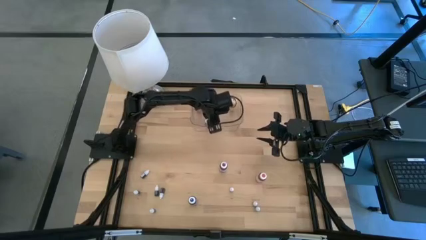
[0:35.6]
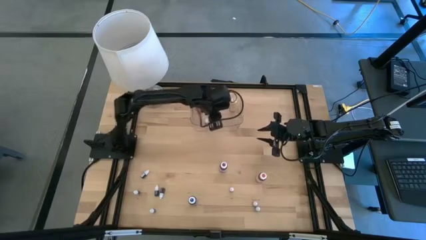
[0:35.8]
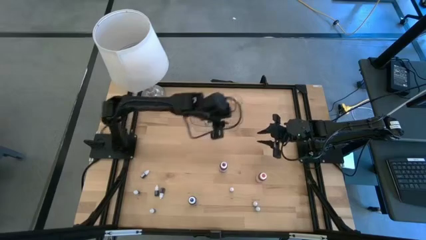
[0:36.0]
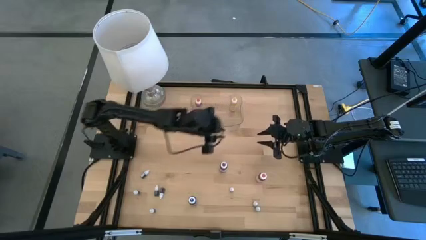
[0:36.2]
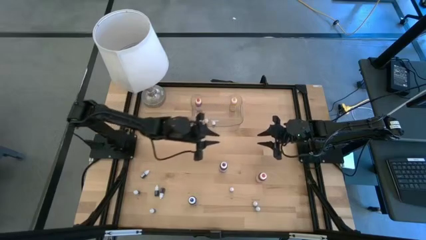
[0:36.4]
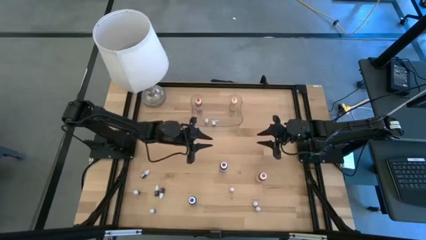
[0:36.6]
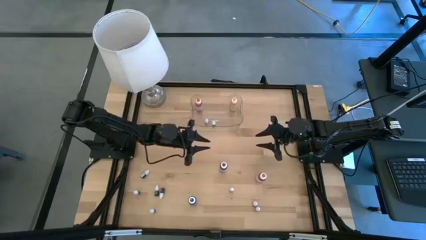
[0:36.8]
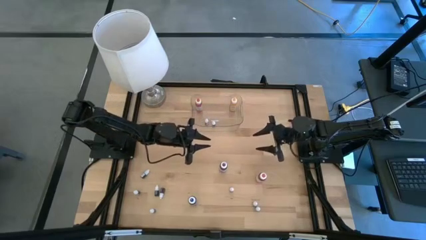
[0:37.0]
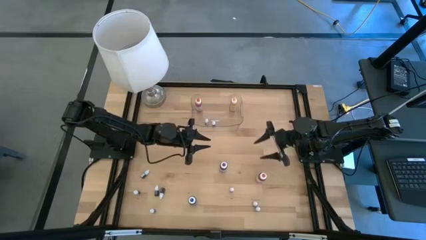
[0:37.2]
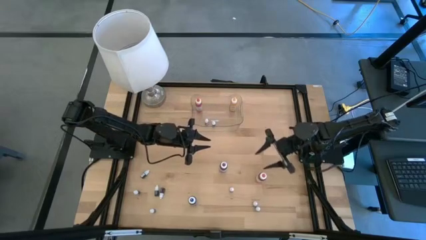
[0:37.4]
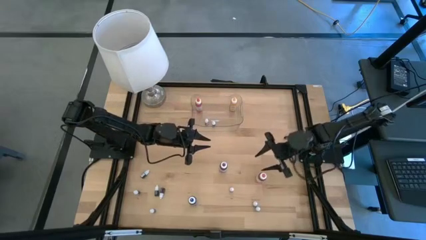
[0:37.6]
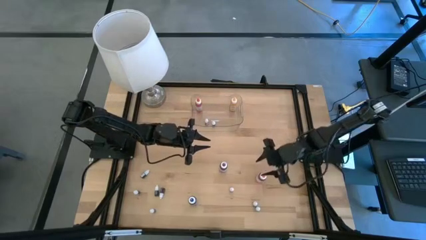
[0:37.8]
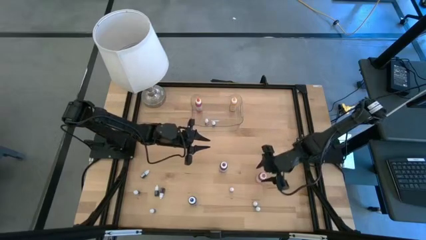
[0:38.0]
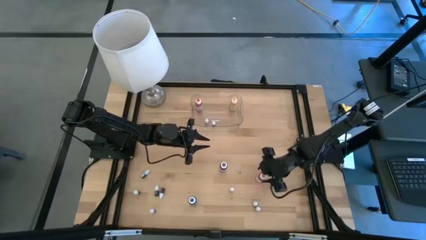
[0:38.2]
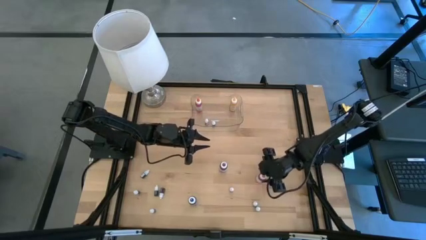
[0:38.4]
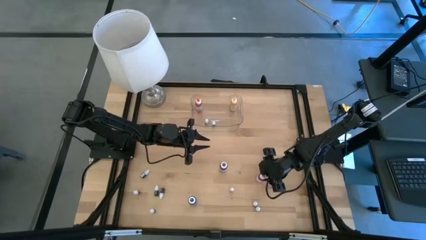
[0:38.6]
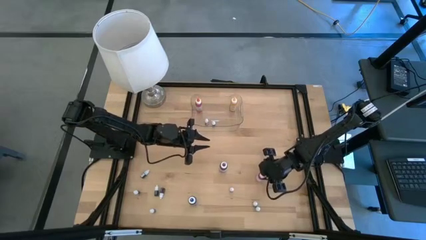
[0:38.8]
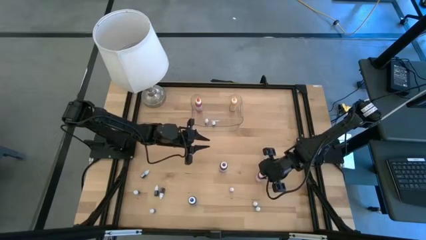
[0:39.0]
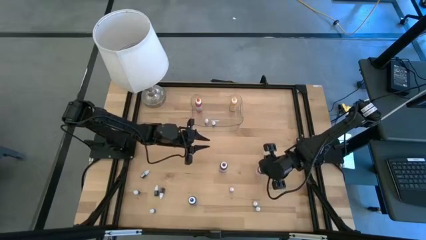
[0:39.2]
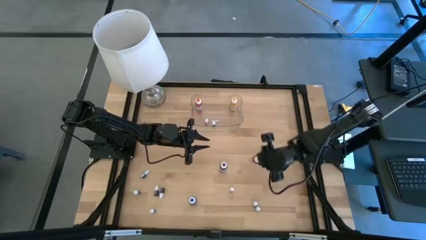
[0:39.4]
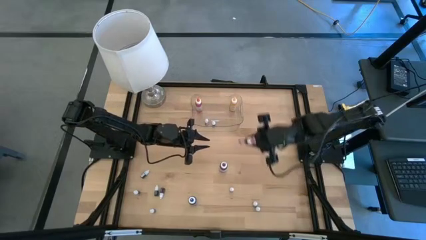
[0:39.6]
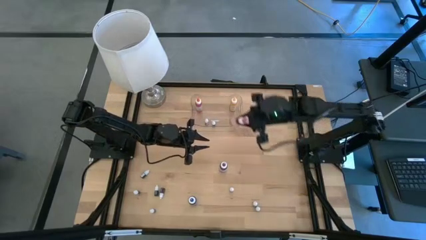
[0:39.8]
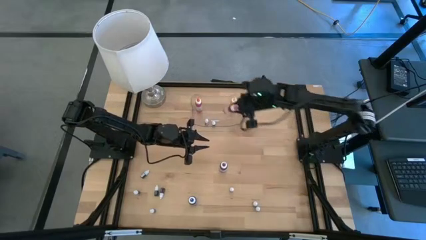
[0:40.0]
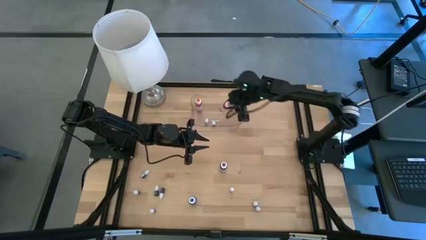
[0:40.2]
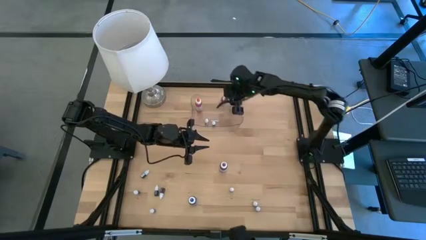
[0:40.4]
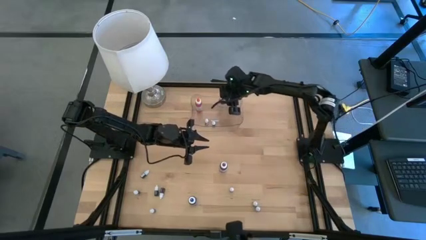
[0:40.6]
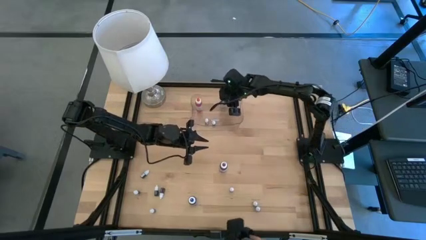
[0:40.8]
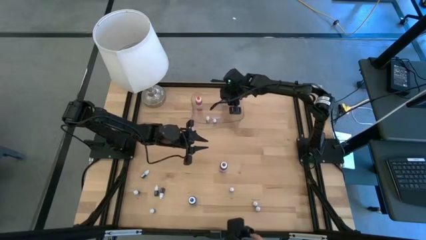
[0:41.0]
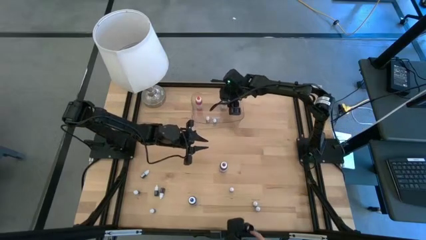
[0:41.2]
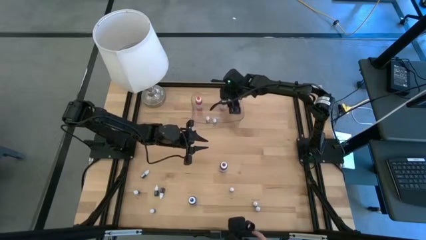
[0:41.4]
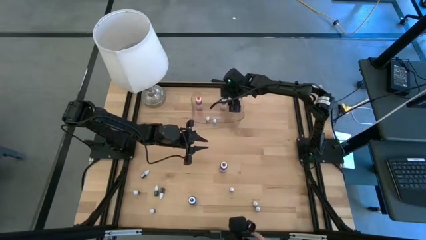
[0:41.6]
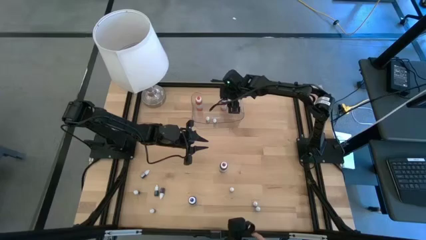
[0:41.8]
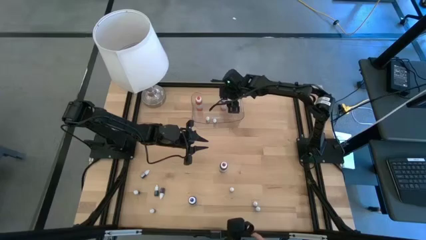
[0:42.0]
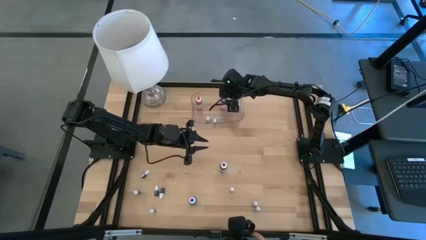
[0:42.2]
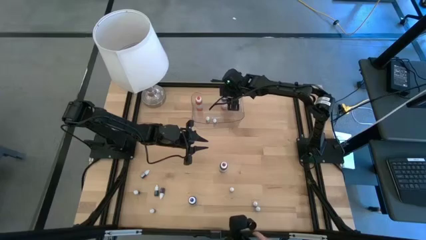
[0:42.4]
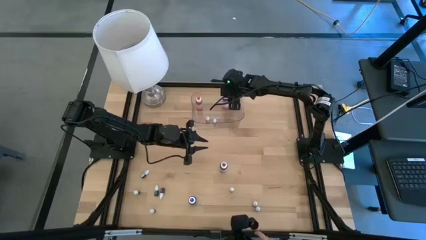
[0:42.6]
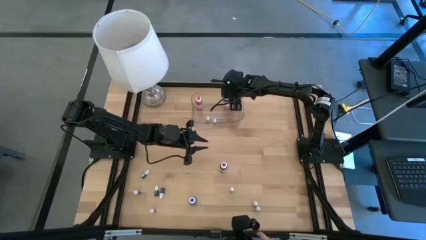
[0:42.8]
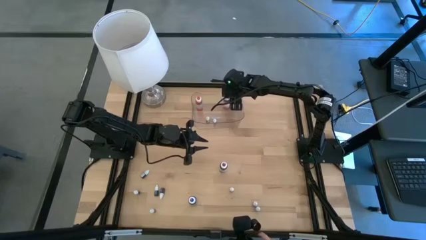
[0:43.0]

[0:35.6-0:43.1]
Task: Pick & Place food coloring
Put the large pink food coloring bottle into the transparent bin

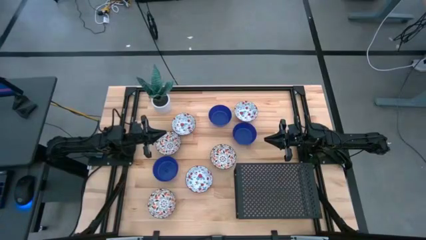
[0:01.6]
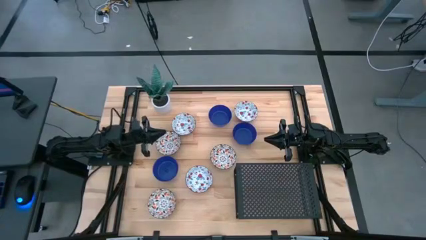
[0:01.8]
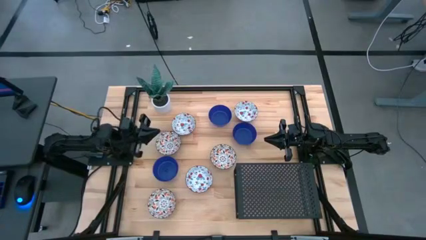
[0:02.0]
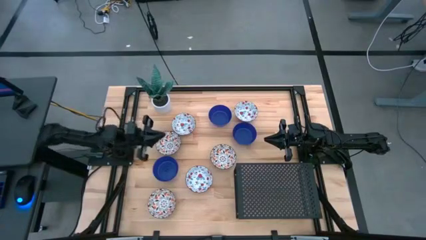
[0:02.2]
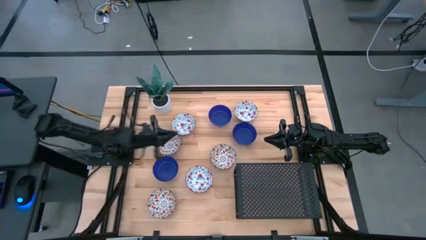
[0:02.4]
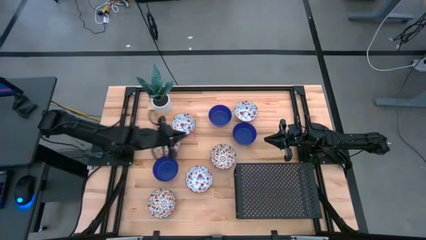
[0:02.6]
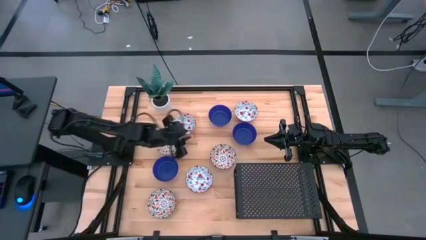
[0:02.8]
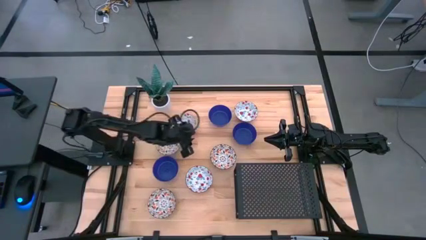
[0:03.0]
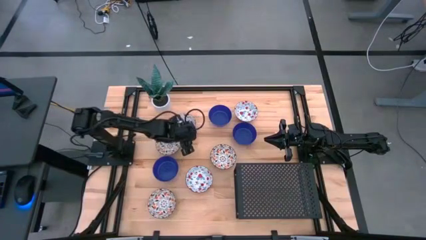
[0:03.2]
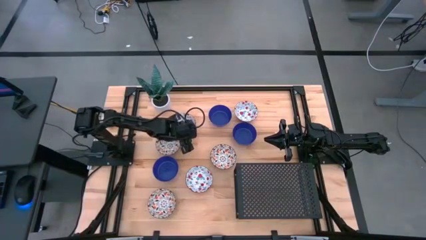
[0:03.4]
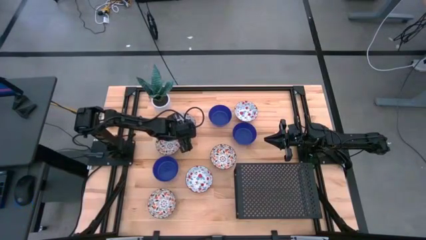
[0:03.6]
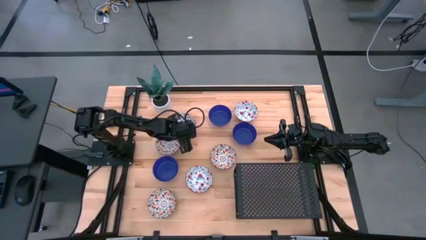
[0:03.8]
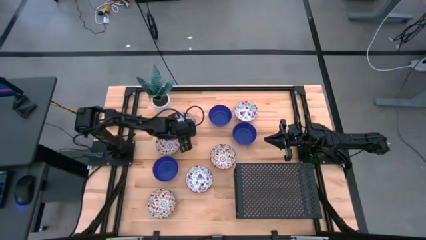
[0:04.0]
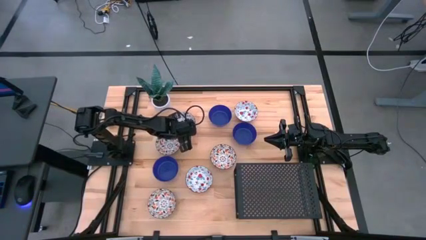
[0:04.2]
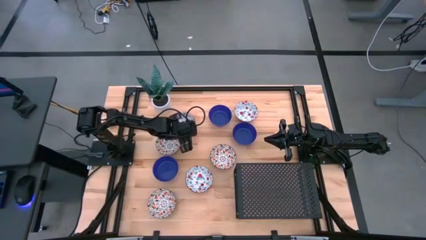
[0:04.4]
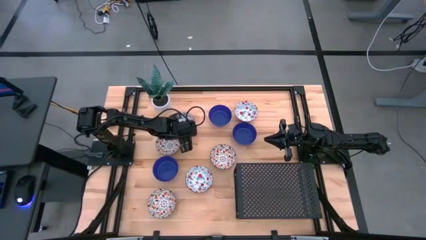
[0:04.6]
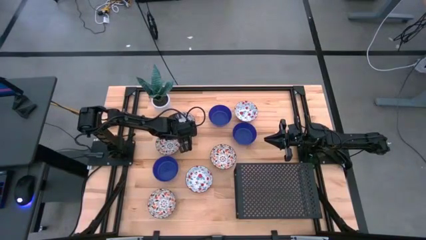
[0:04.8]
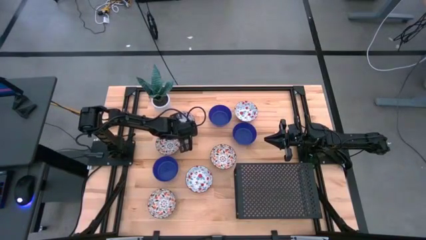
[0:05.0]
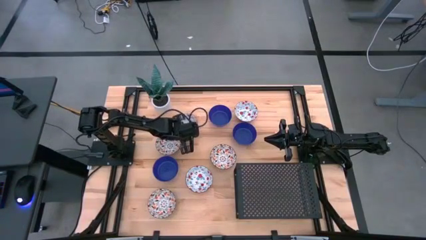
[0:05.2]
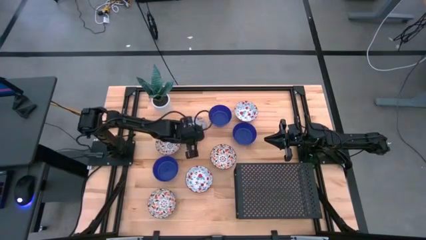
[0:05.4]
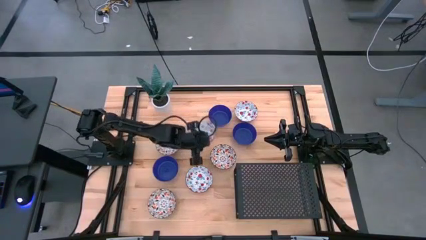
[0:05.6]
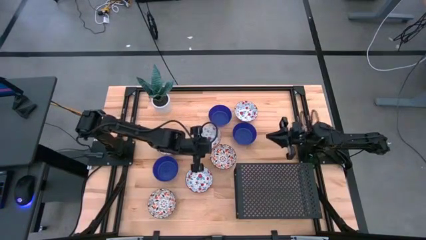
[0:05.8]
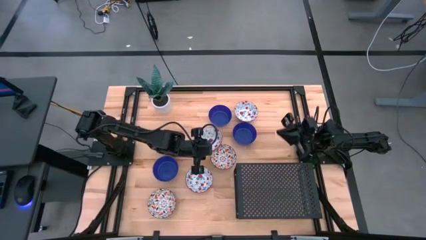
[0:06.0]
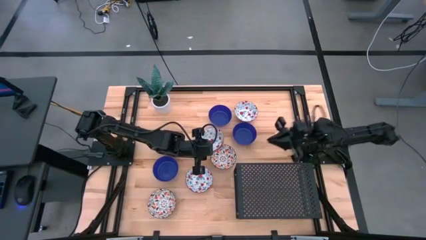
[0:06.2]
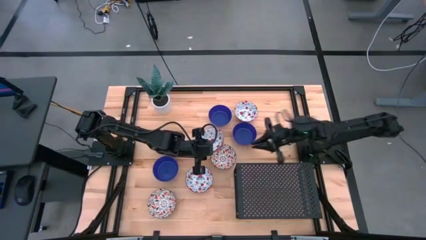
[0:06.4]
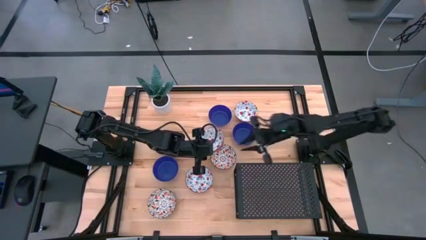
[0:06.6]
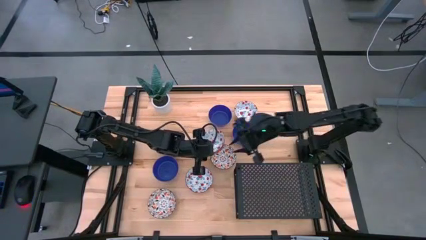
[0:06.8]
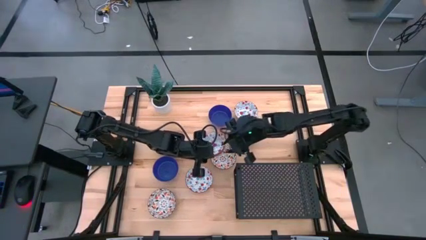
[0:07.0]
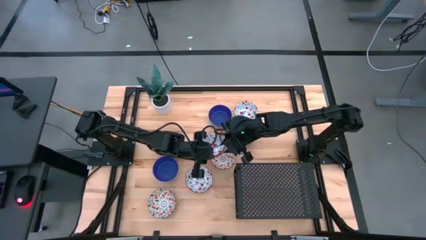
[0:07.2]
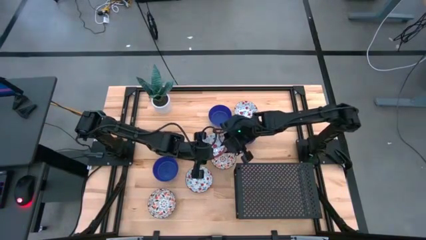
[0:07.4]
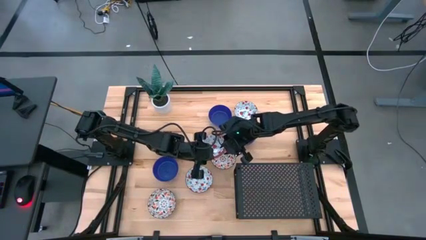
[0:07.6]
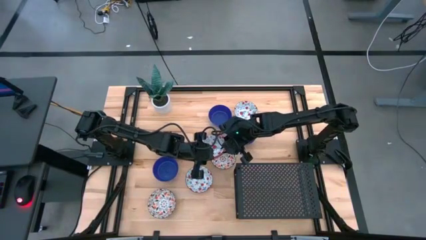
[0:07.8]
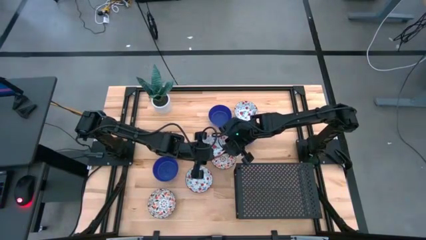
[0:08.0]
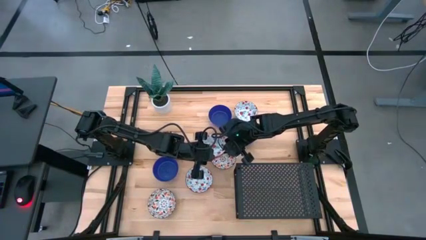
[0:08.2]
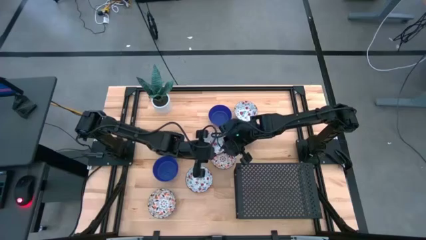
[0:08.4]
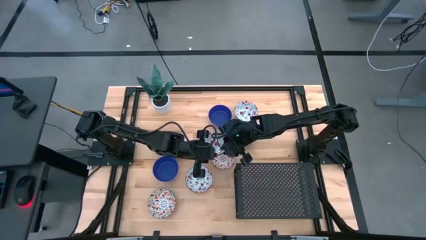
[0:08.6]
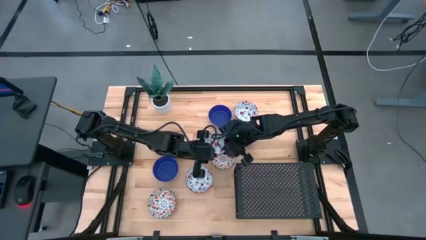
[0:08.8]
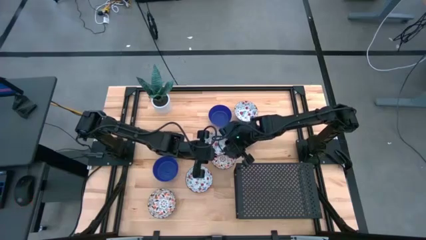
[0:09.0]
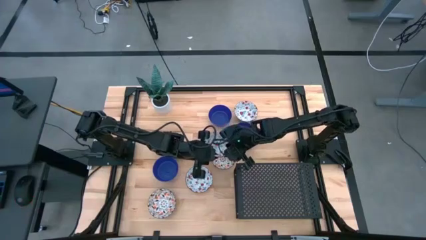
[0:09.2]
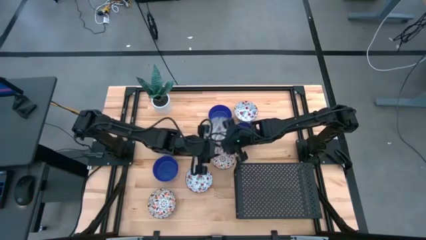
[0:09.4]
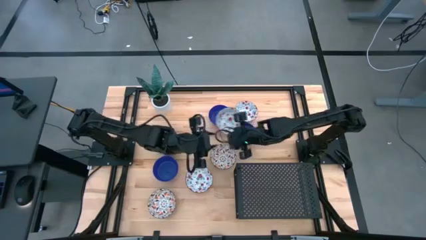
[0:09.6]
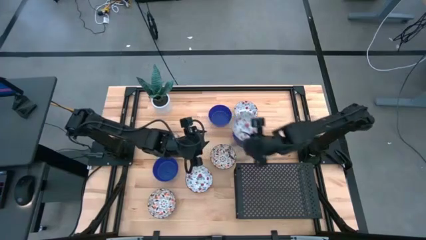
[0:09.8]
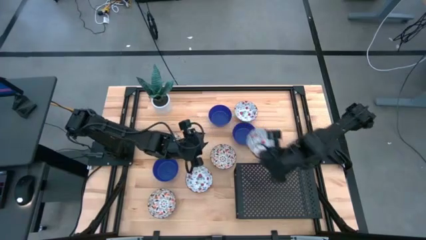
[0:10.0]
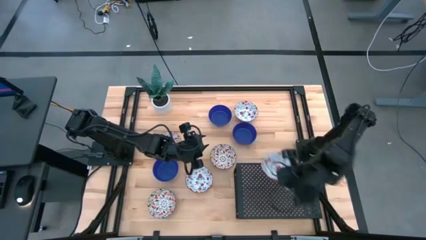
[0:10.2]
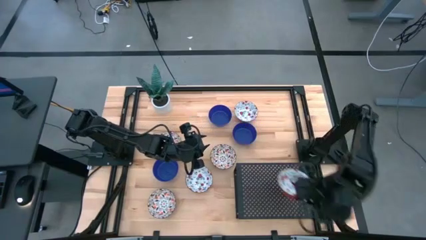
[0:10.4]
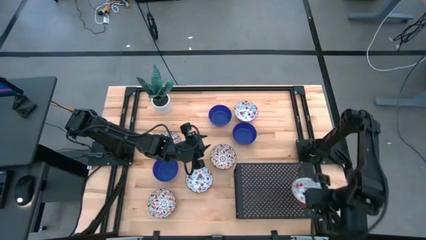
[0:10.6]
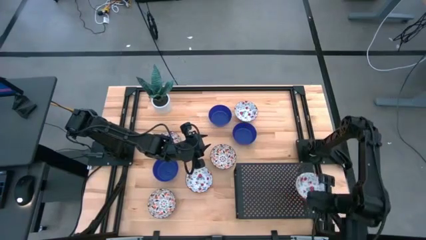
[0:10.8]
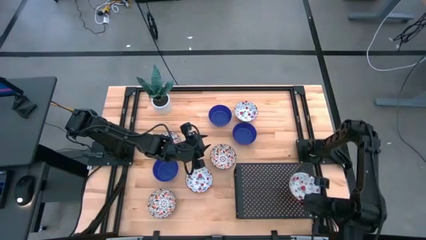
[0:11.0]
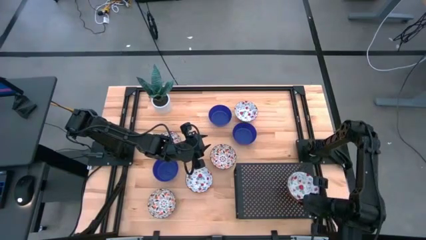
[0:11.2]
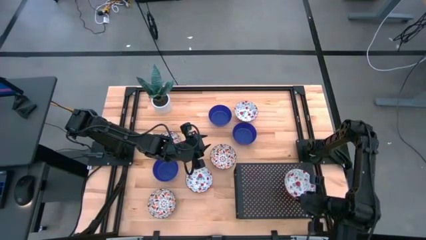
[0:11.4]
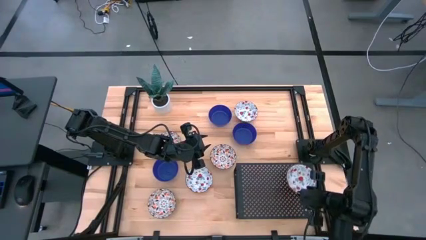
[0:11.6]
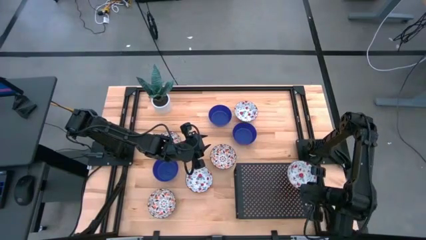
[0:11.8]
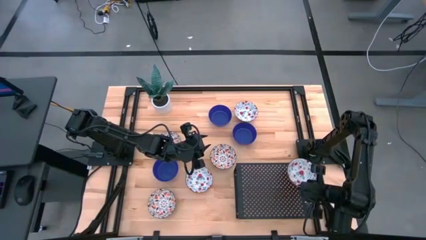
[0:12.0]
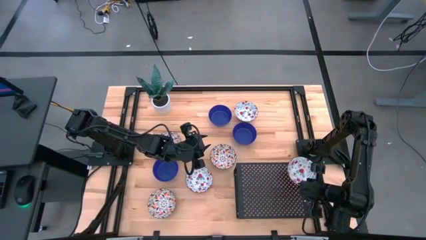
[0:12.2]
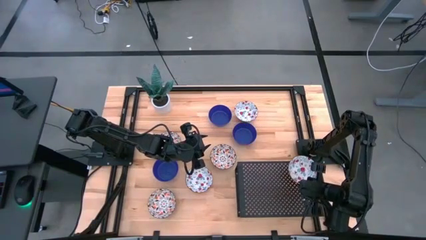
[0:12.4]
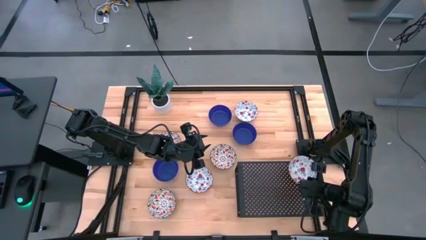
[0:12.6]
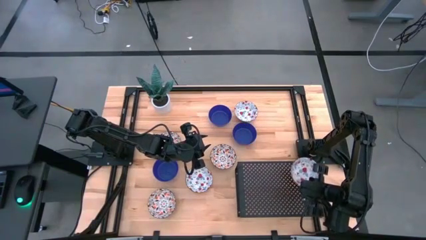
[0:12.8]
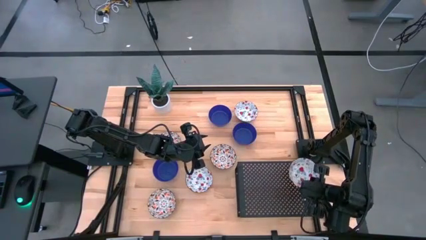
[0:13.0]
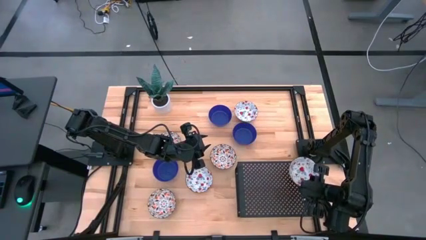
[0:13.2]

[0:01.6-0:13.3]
Task: Pick & Place Mini bowls
Put the top left red patterned bowl on the shelf
